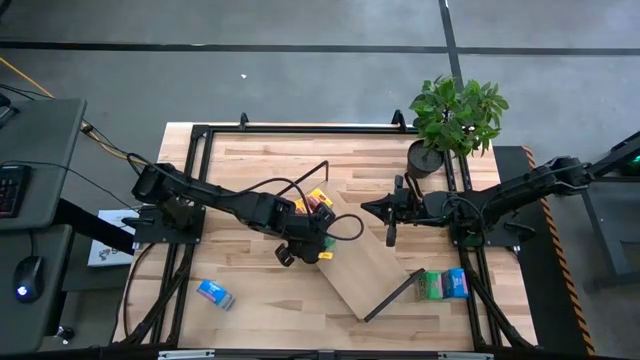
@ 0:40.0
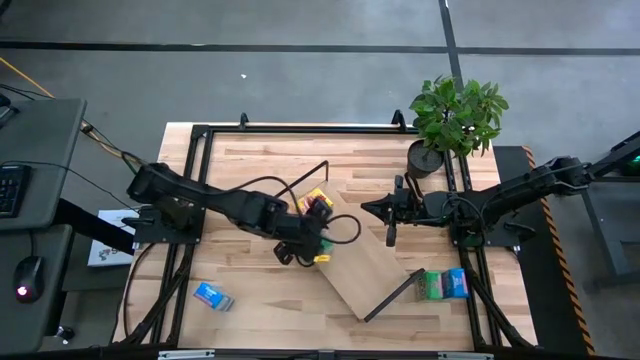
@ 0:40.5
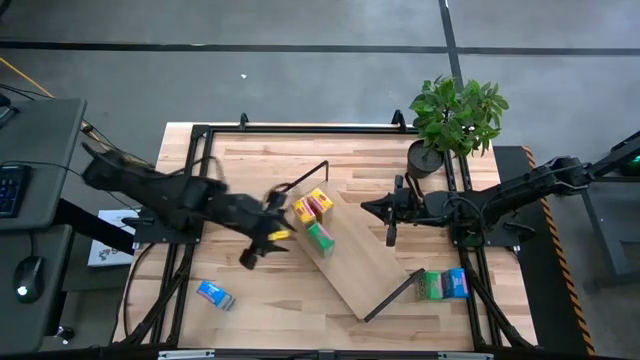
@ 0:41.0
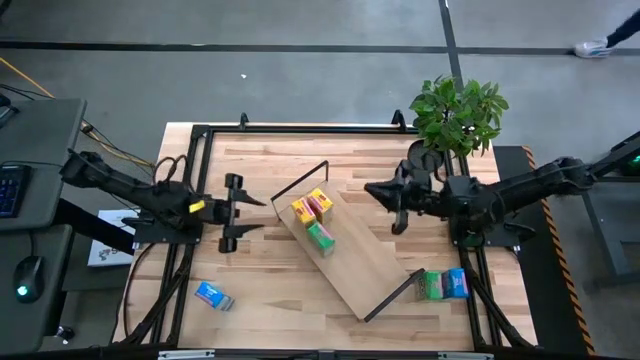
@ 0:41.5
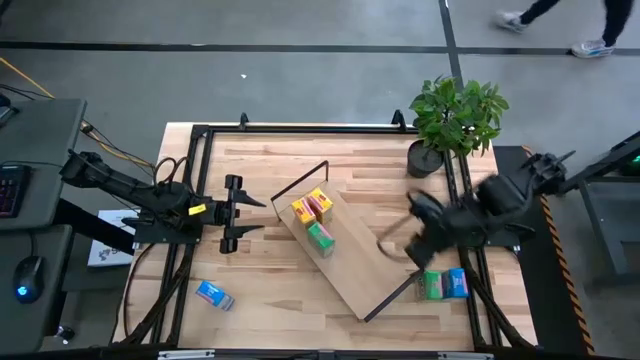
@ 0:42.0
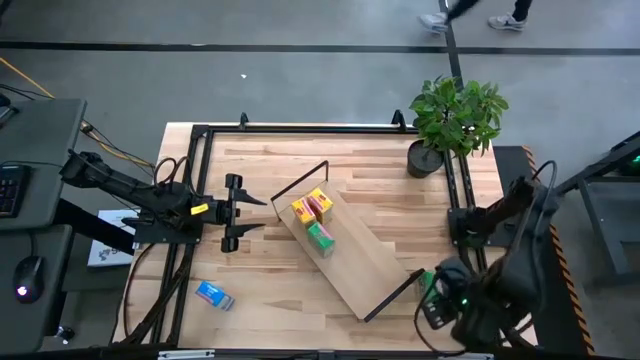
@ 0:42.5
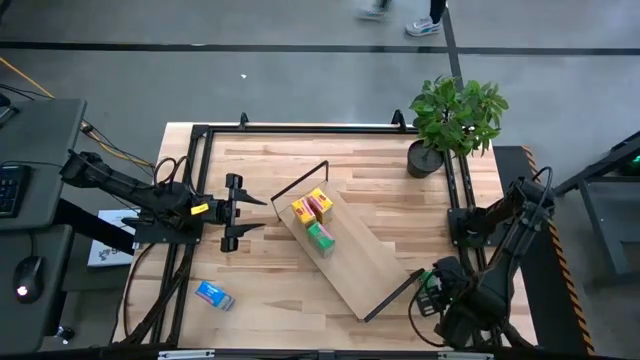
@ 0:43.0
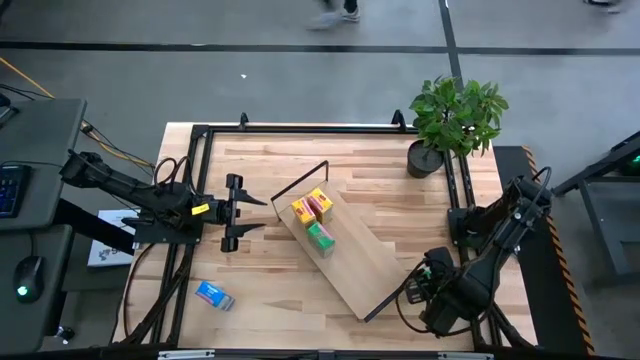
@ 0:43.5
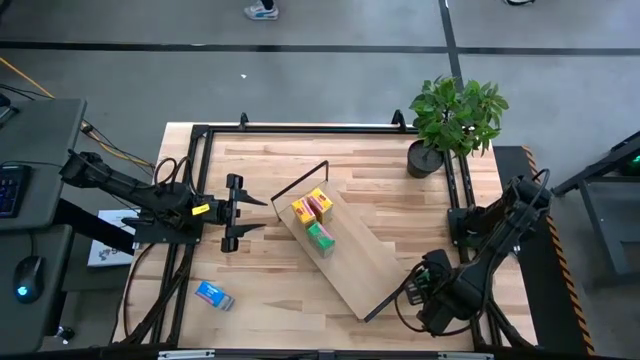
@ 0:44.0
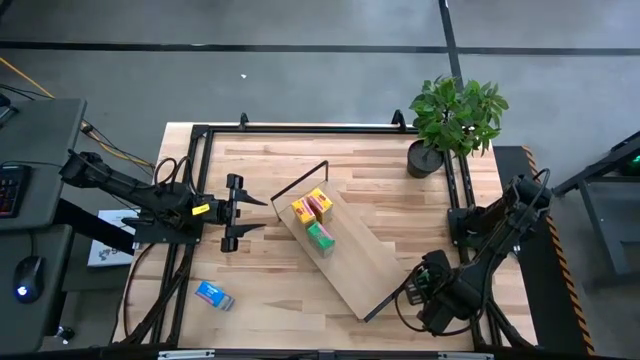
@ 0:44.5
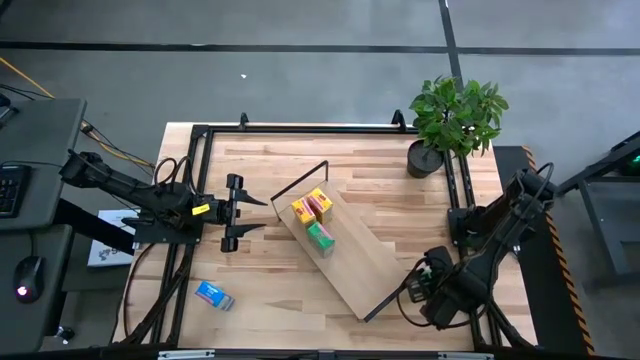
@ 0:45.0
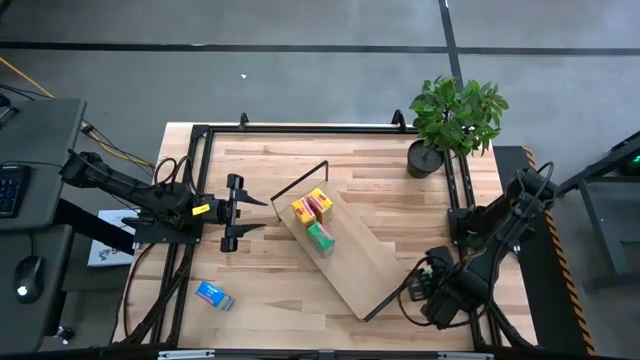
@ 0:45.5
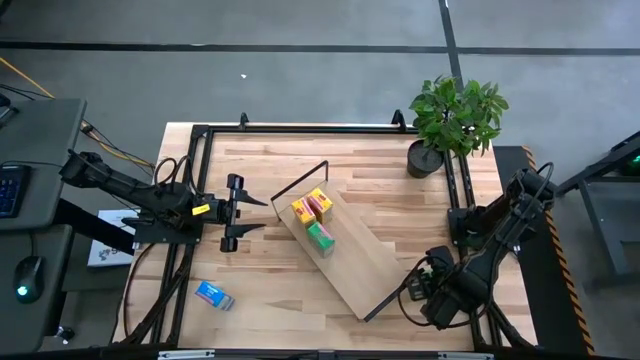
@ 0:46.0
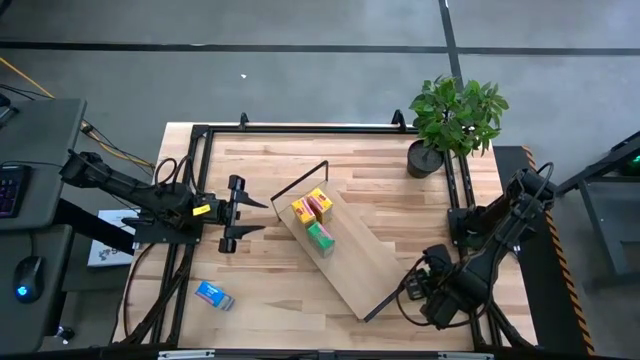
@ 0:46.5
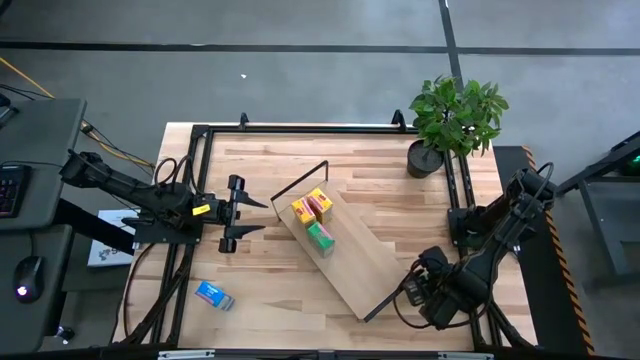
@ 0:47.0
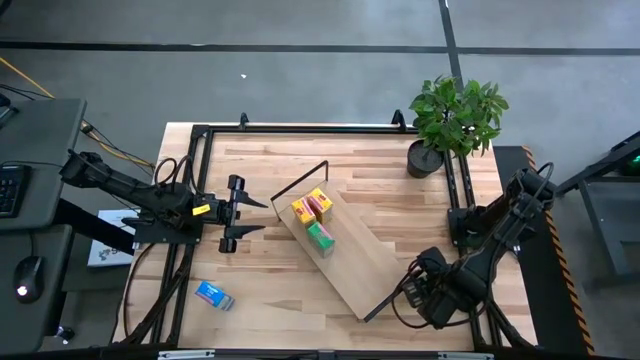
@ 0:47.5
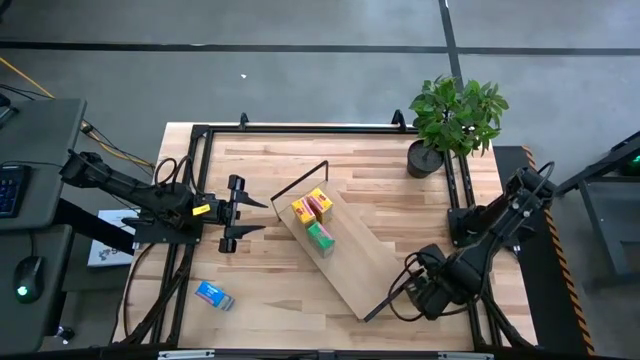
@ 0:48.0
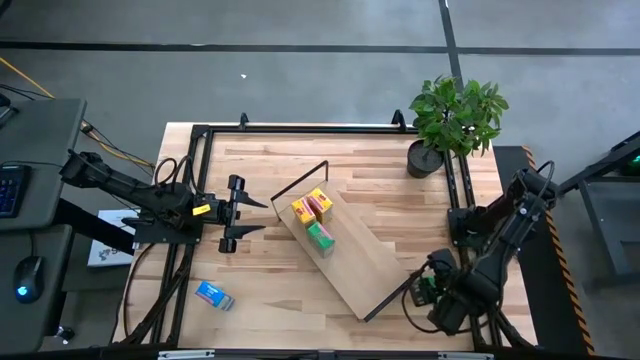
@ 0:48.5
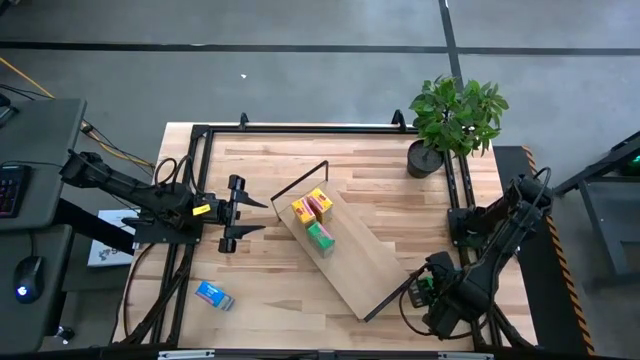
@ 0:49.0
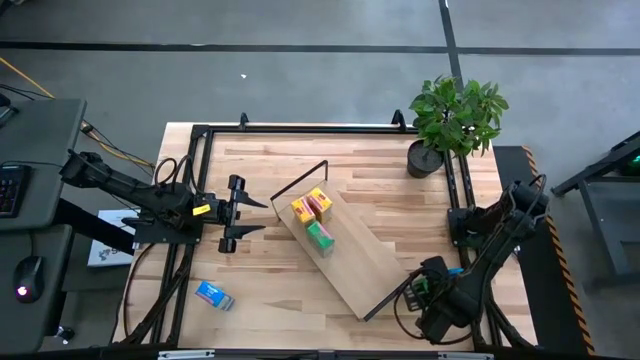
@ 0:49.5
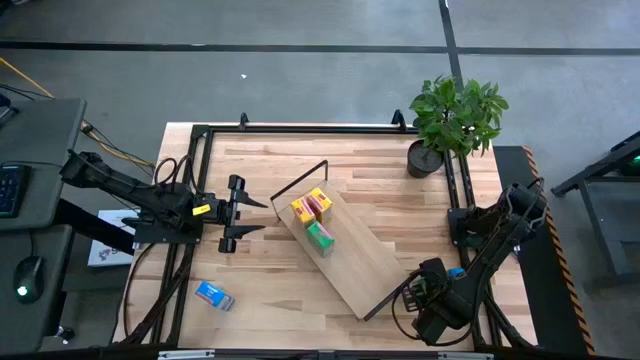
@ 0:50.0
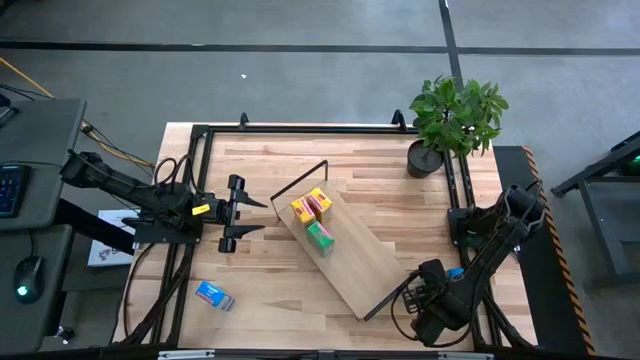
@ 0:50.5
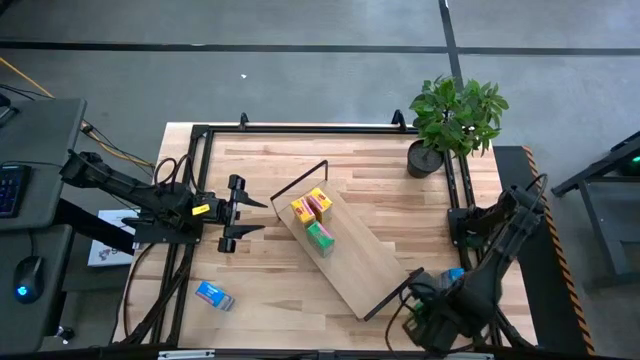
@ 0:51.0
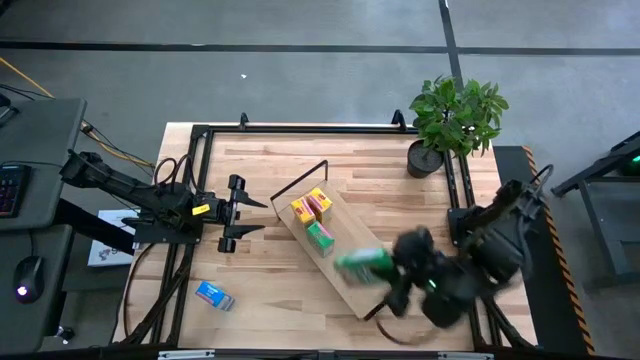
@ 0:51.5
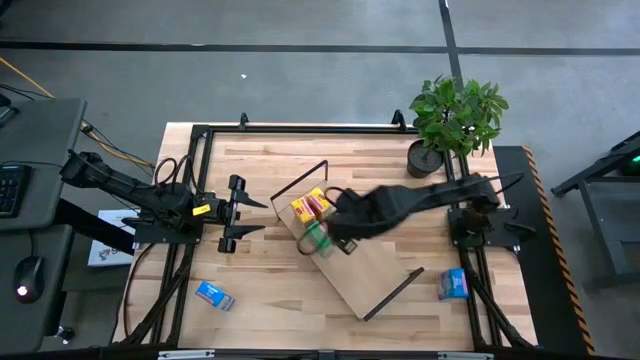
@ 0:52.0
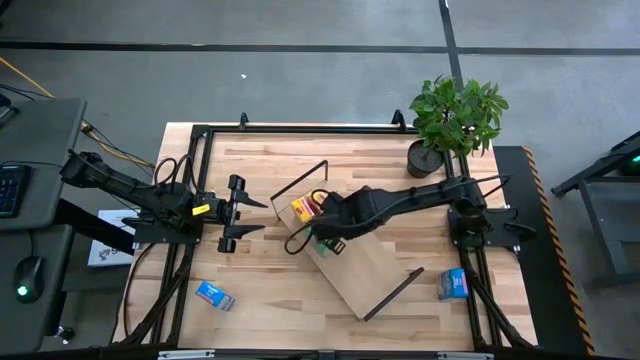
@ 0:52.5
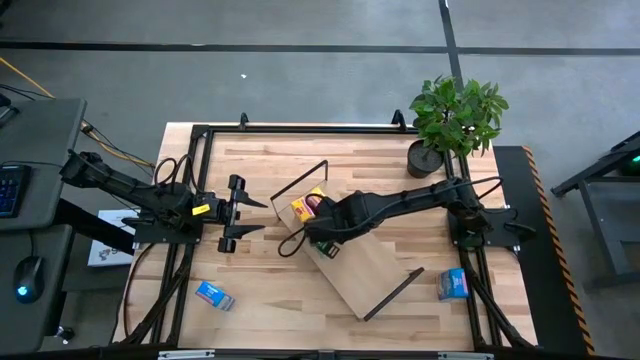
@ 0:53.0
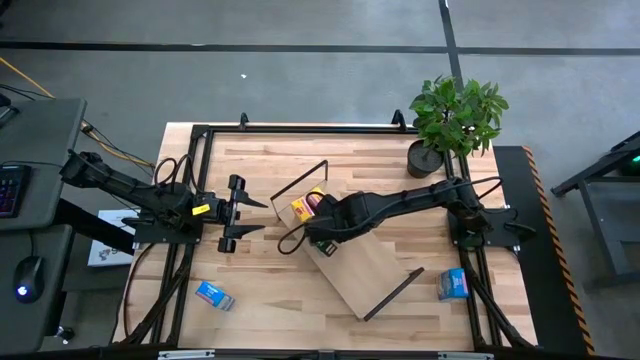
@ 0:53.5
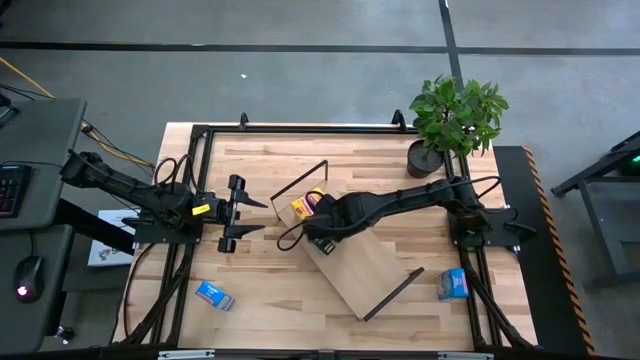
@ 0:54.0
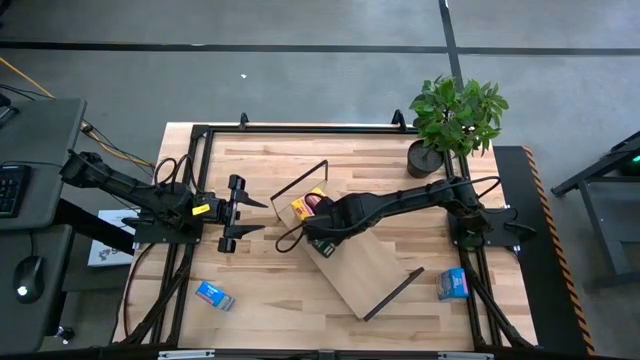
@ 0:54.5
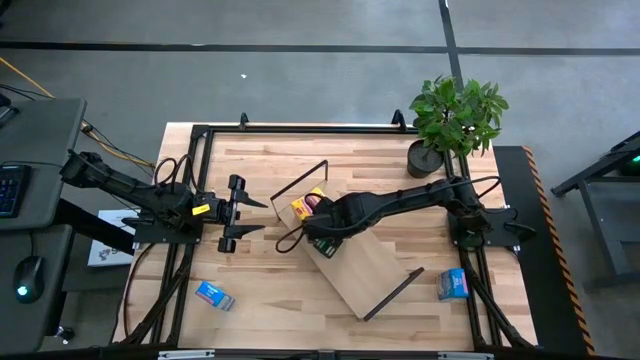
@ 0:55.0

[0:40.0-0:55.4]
Task: Stack cereal on shelf
Put the green cereal box aligned with the other green cereal box on the shelf on the shelf

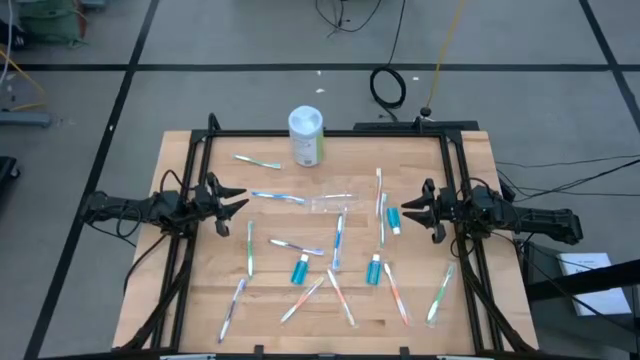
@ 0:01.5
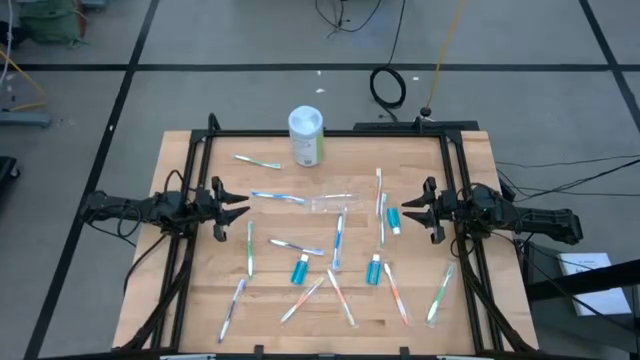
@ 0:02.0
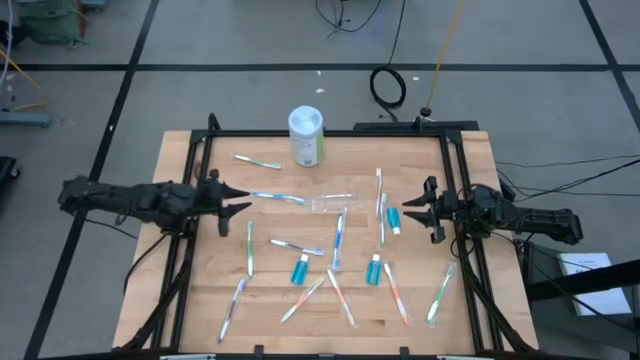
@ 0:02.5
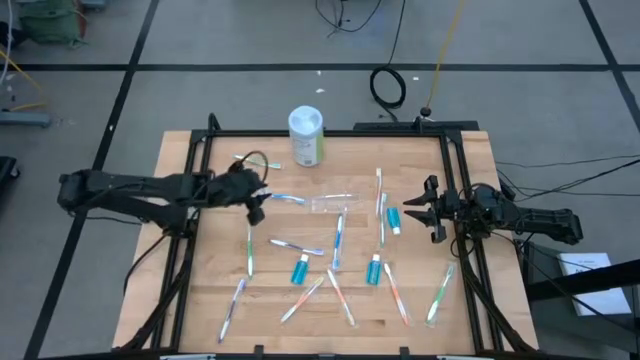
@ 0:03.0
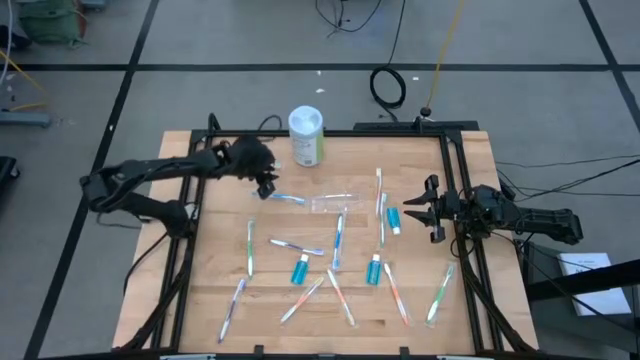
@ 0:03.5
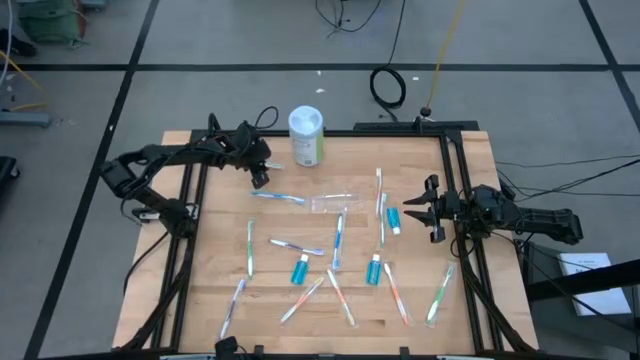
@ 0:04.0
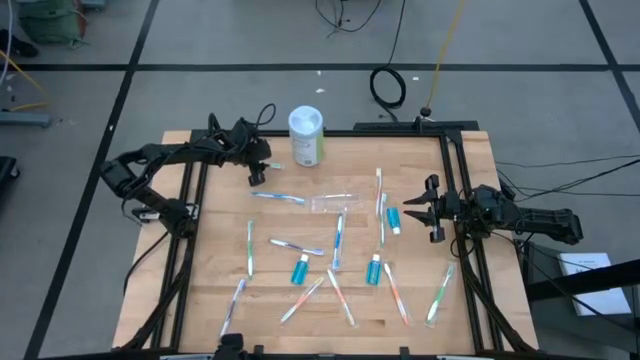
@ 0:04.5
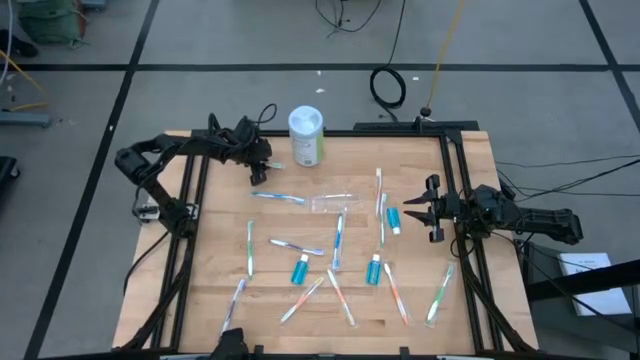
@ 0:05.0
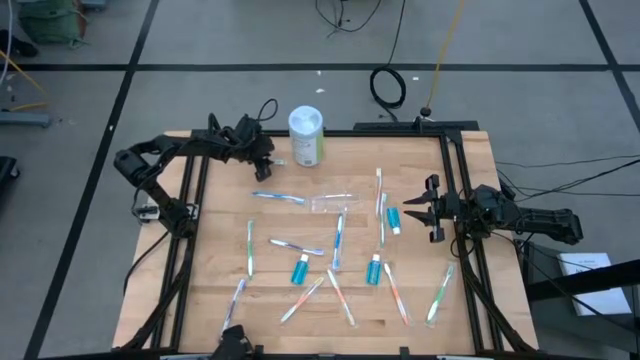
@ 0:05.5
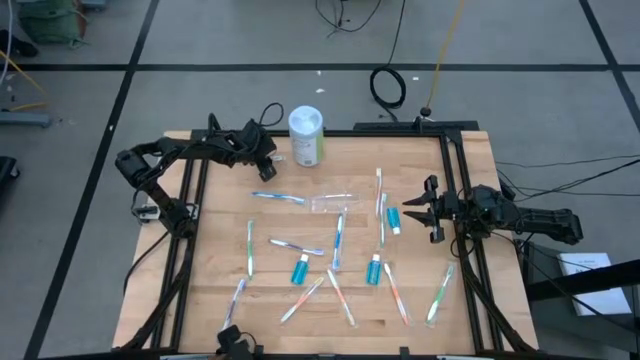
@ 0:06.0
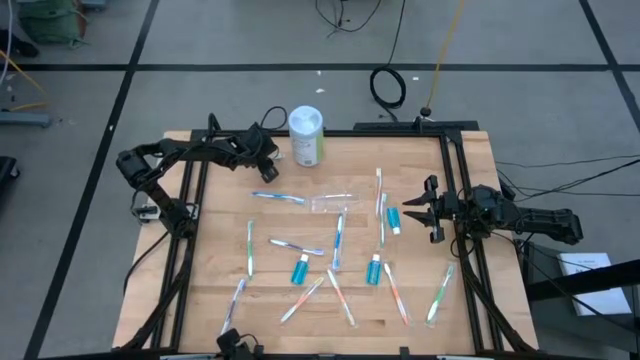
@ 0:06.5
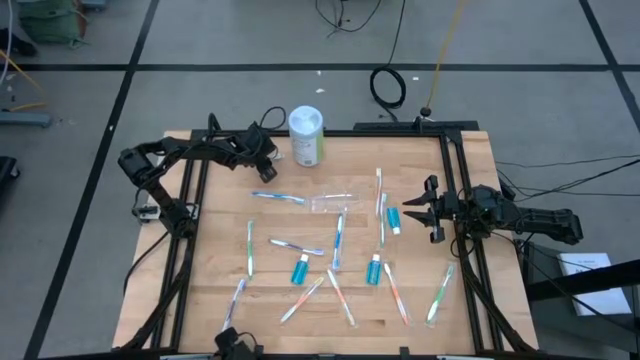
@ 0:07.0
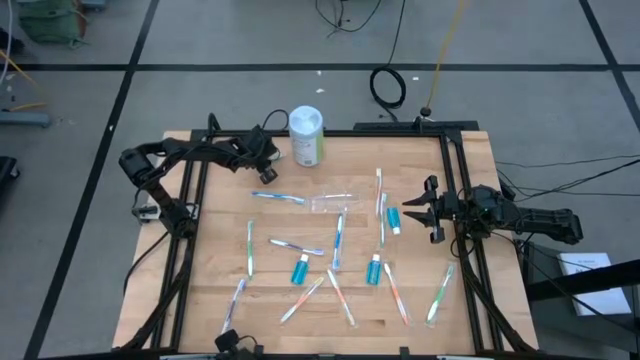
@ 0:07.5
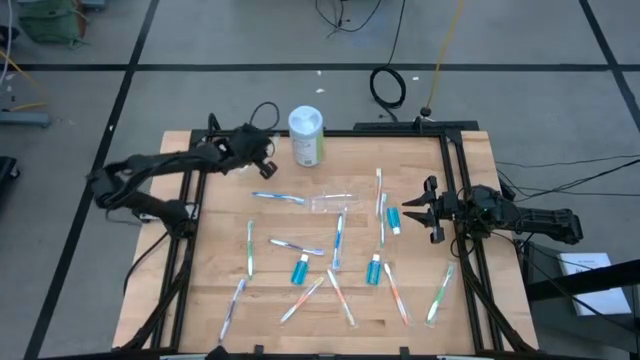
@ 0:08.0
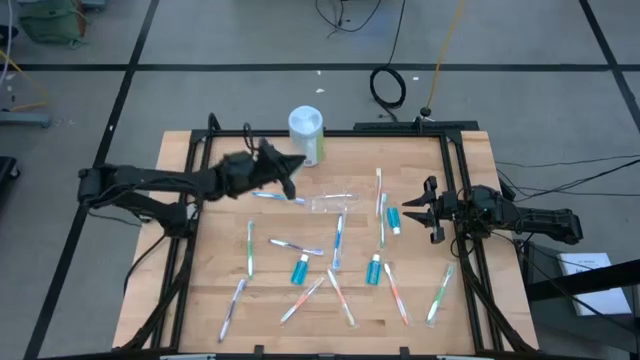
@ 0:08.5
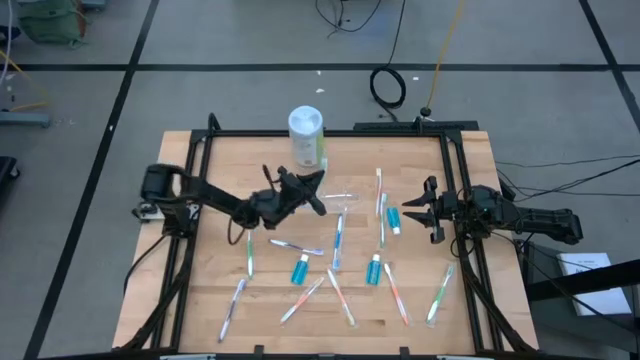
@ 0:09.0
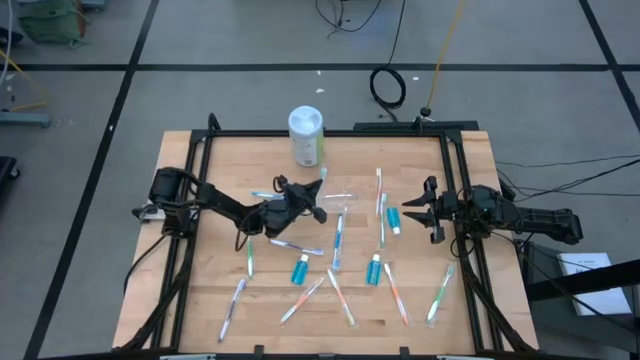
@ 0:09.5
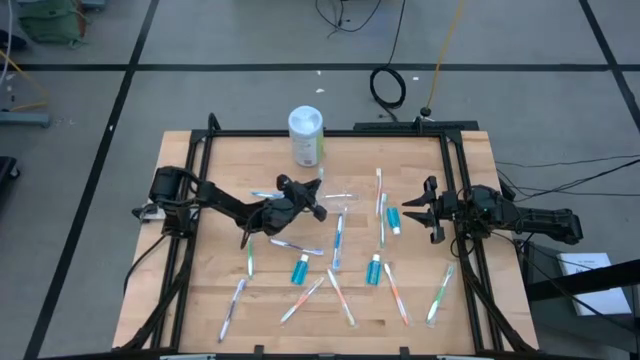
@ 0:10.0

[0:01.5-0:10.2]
Task: Pick & Place toothbrushing station
Put the green toothbrush into the transparent organizer
